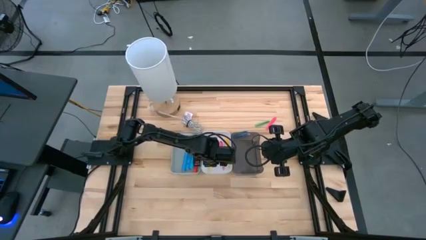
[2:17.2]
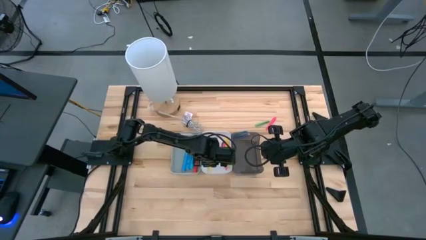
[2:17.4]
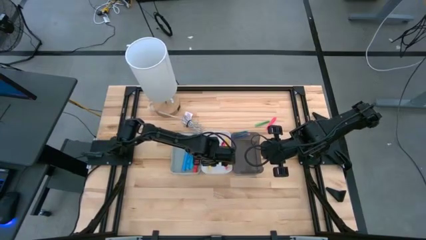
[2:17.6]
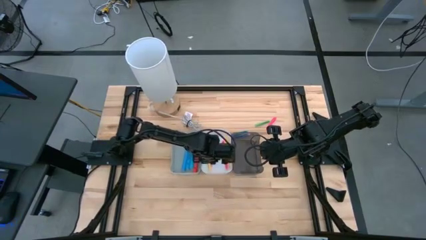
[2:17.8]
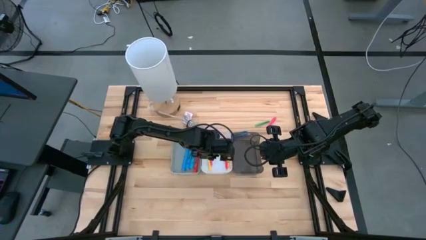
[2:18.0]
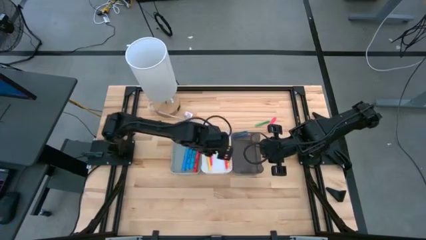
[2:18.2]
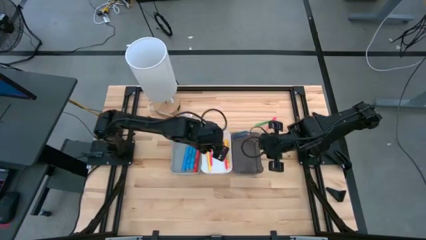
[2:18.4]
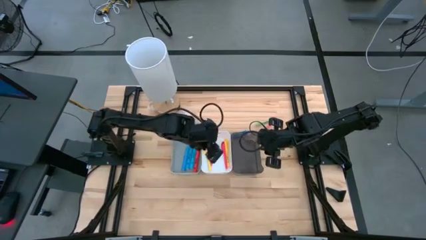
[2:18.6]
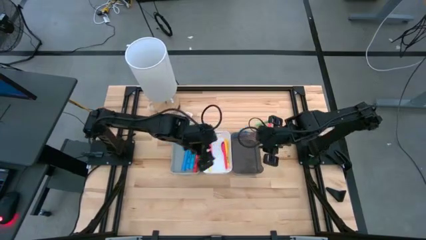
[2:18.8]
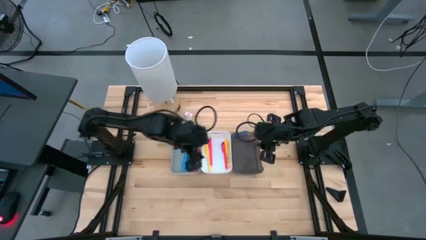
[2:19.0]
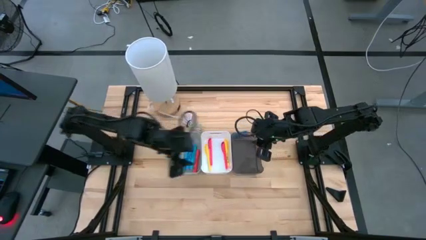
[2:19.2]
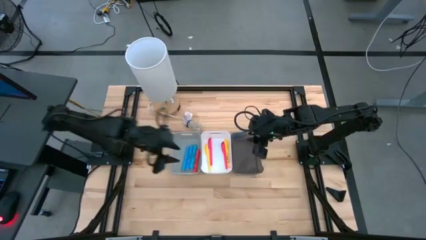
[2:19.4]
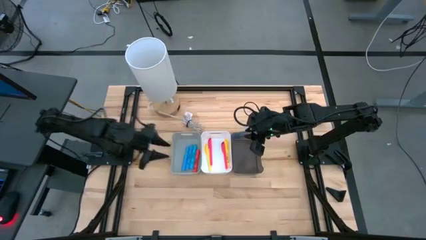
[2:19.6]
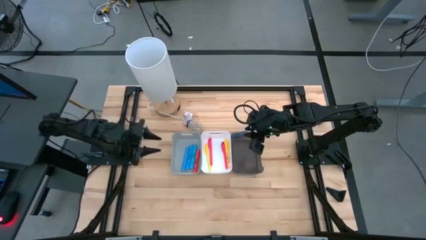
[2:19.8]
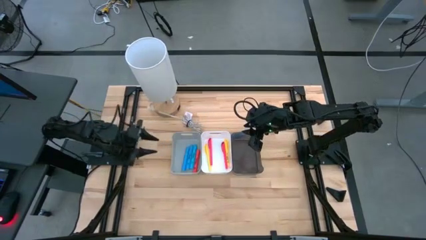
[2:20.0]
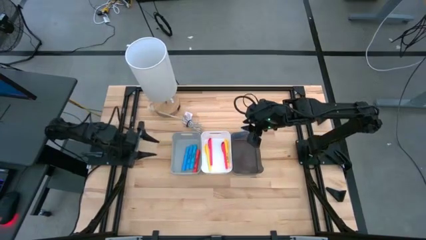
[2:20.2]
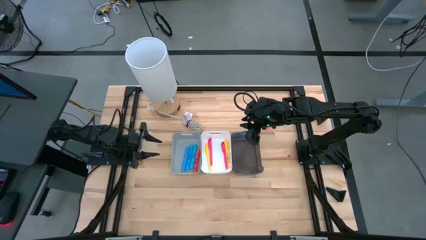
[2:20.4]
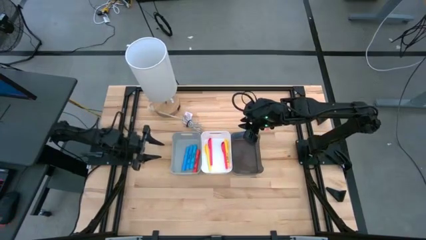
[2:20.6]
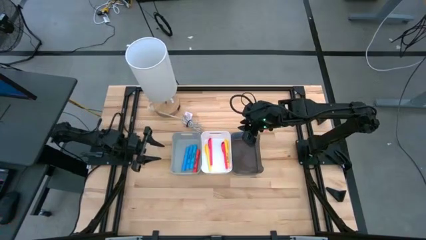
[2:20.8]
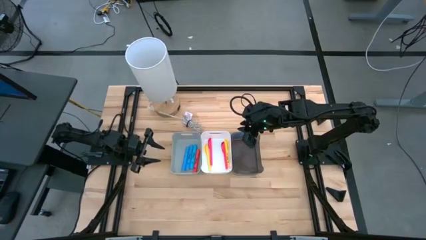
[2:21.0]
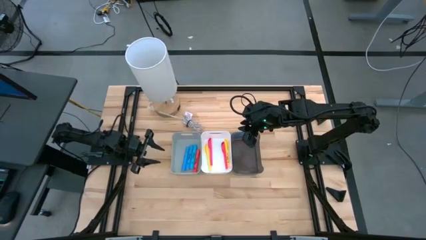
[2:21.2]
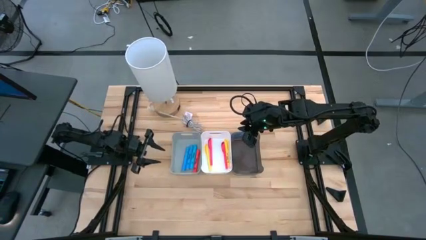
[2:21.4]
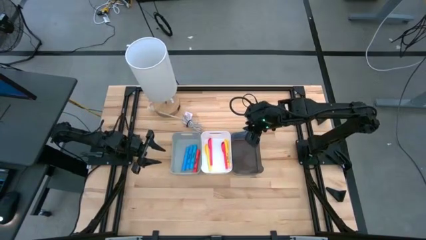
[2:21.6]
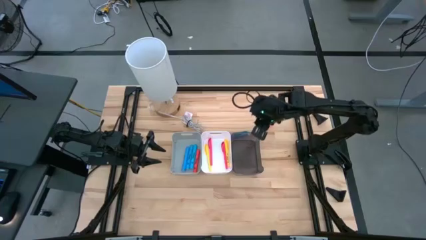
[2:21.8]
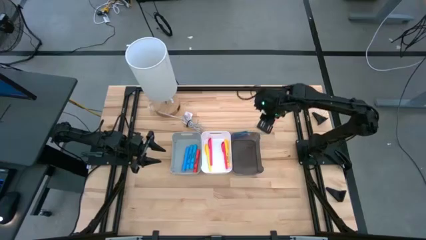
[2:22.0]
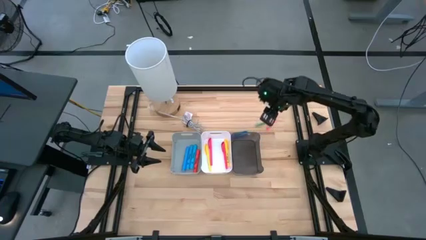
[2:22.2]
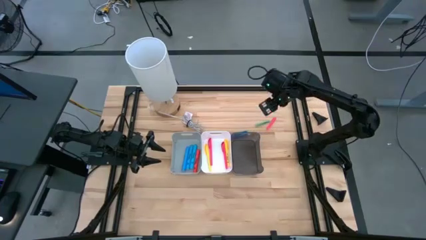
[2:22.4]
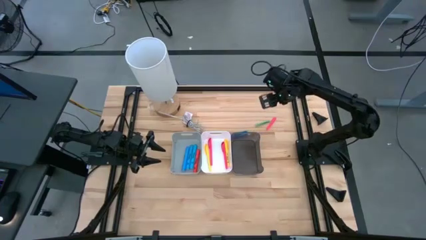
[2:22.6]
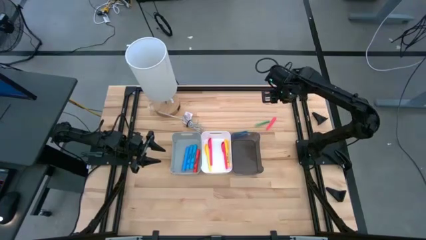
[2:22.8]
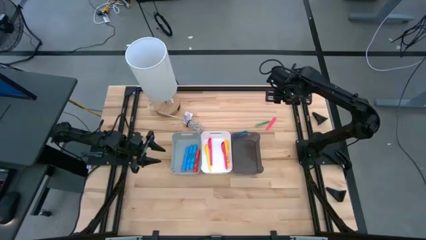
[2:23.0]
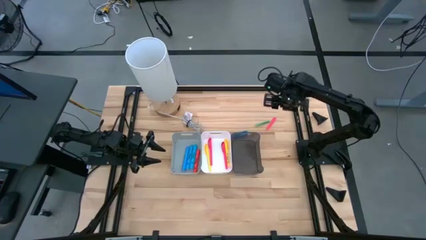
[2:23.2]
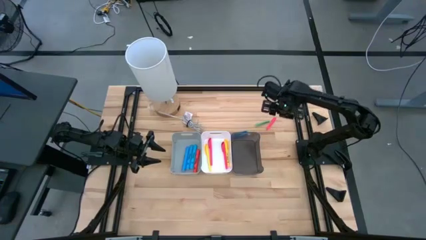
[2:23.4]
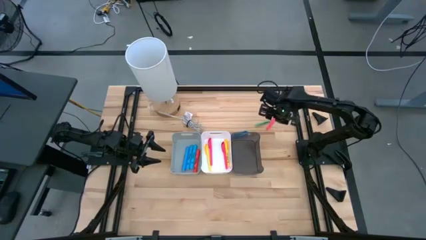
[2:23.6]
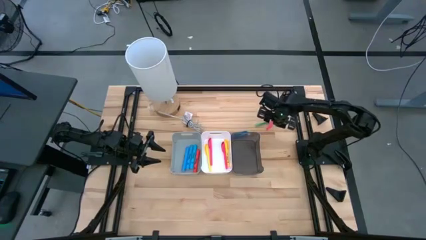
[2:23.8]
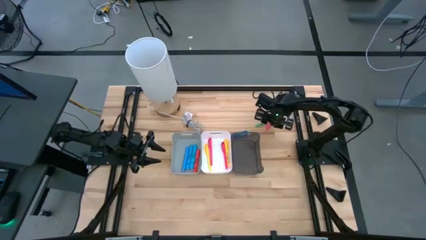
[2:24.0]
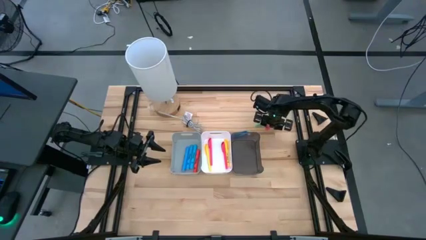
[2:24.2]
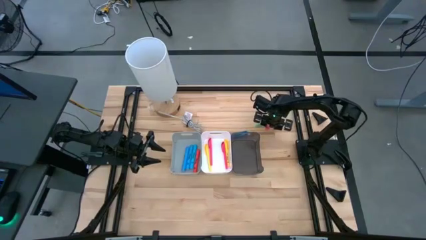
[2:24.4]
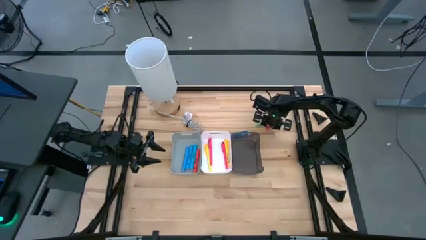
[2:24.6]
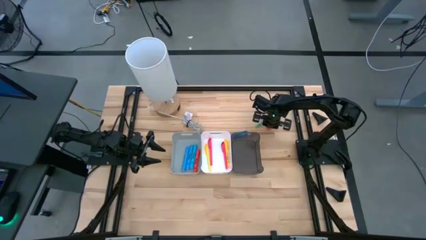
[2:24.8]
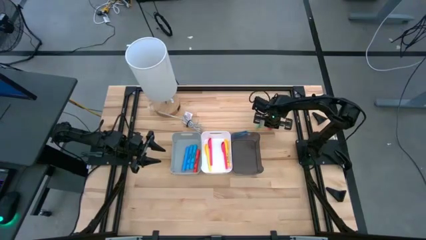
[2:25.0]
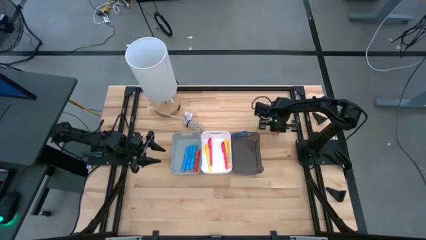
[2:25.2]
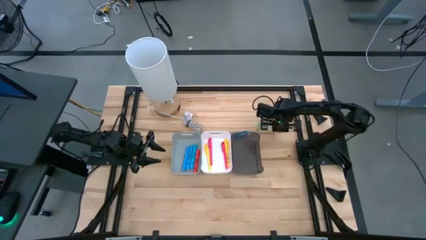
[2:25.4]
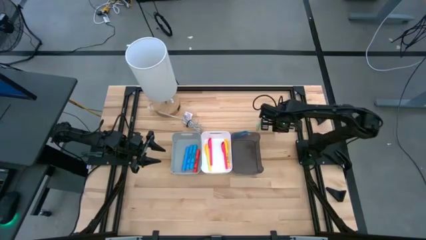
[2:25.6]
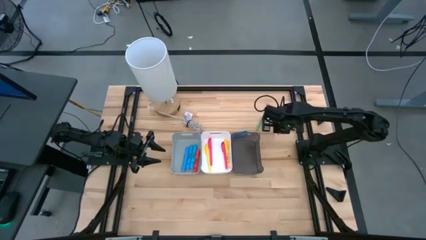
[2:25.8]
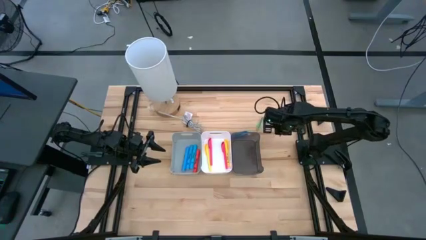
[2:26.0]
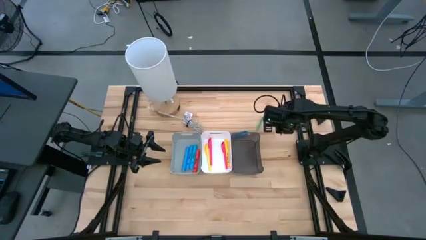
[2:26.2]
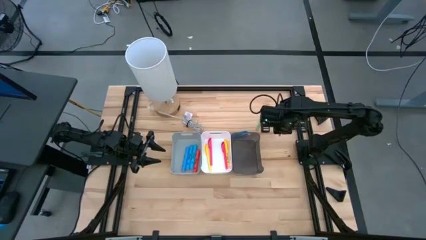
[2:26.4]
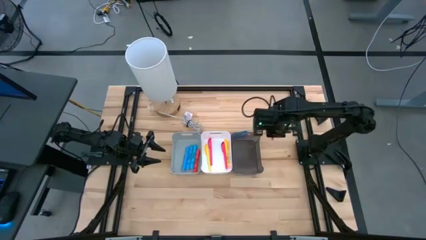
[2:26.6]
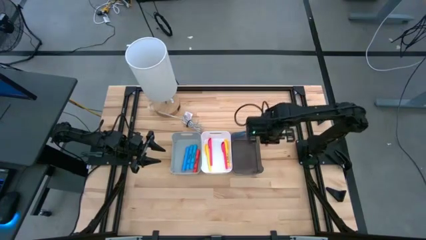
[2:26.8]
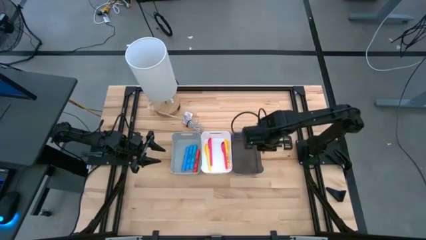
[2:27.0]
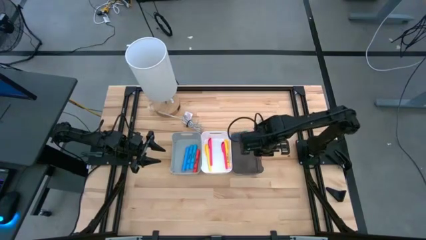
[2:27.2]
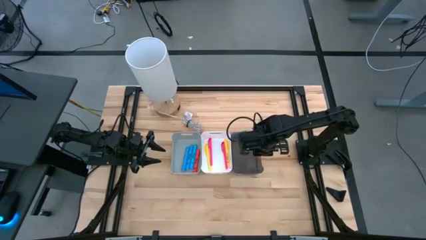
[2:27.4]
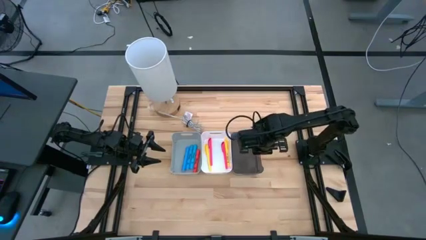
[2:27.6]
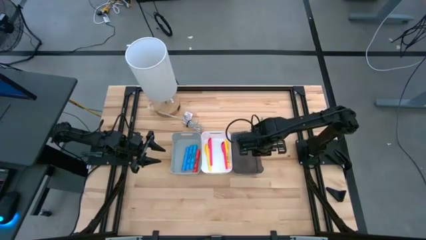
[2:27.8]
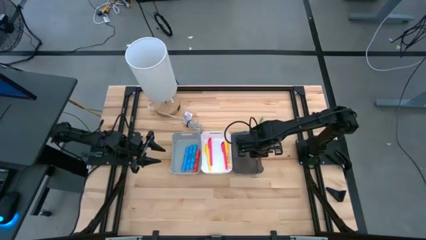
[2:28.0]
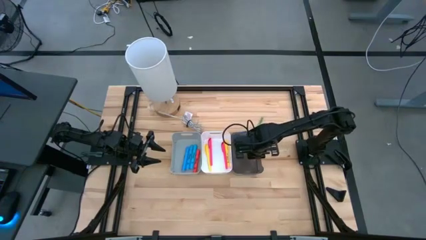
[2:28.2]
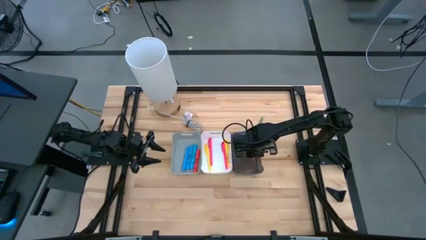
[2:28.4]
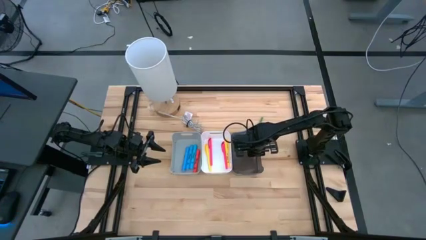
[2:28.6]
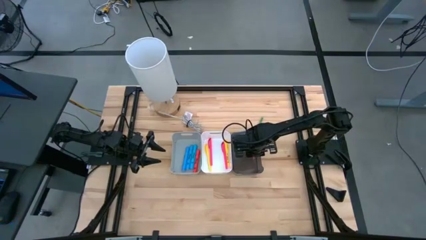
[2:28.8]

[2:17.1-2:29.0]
Task: Pick & Place Markers
Put the small pink pen into the black bin

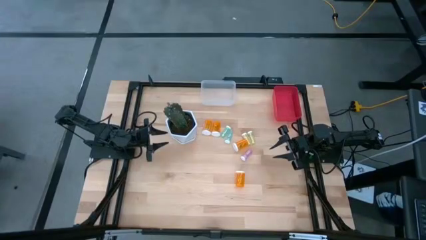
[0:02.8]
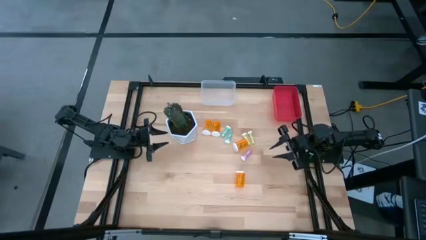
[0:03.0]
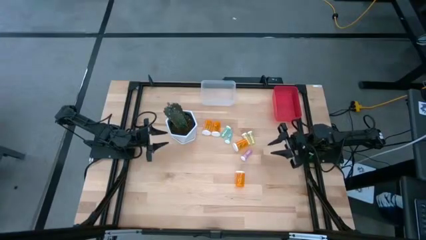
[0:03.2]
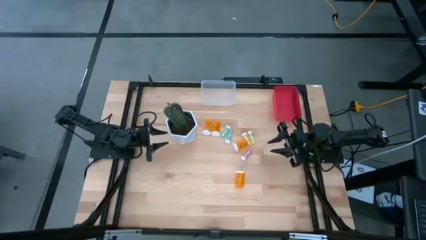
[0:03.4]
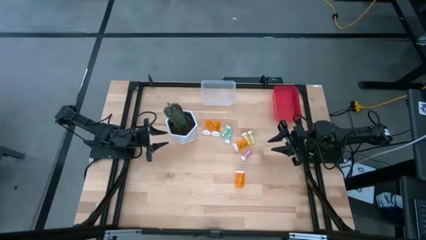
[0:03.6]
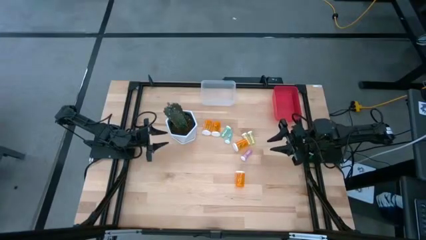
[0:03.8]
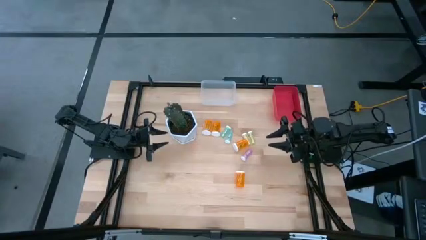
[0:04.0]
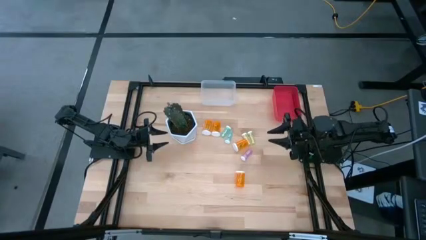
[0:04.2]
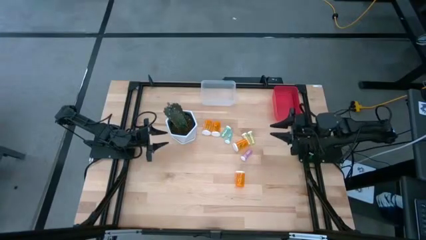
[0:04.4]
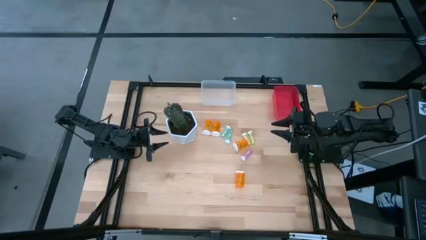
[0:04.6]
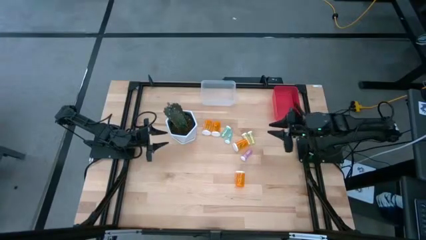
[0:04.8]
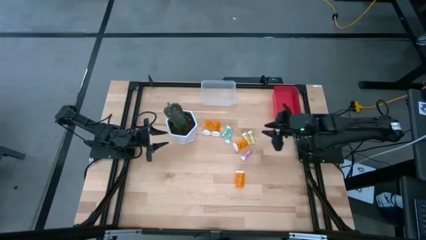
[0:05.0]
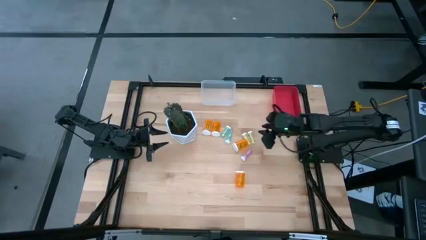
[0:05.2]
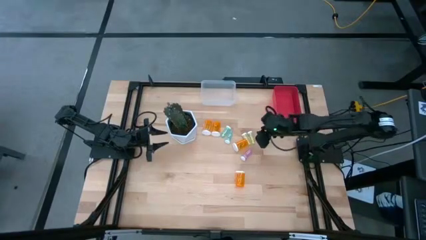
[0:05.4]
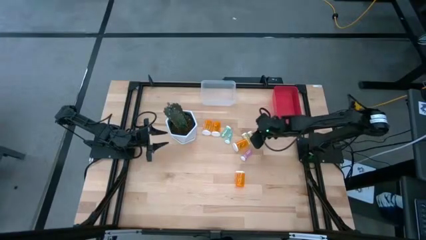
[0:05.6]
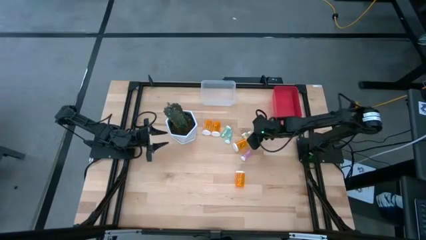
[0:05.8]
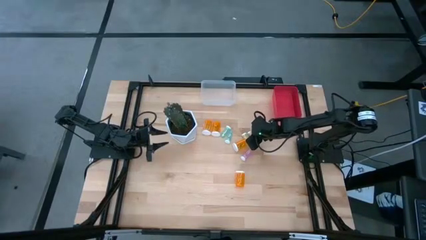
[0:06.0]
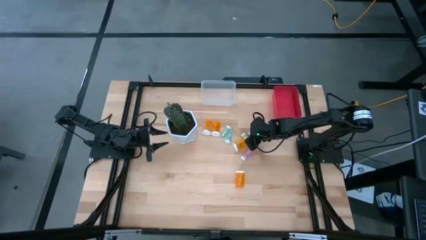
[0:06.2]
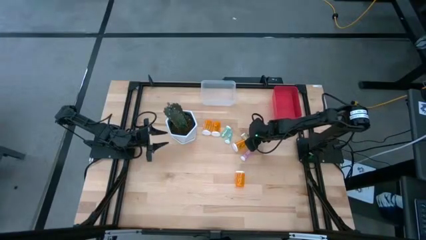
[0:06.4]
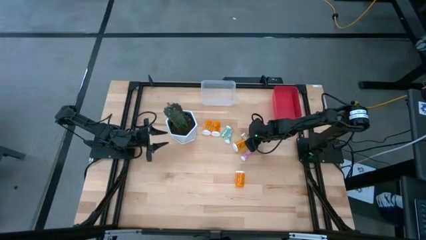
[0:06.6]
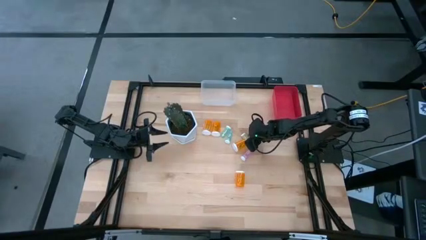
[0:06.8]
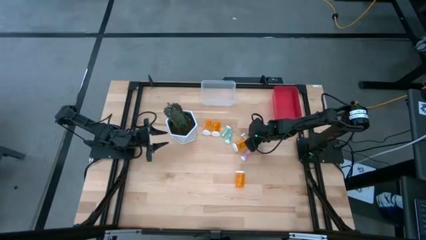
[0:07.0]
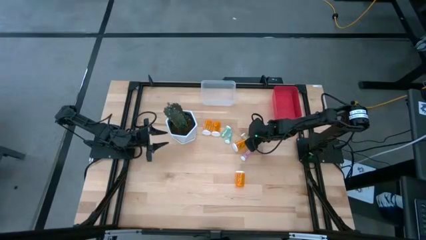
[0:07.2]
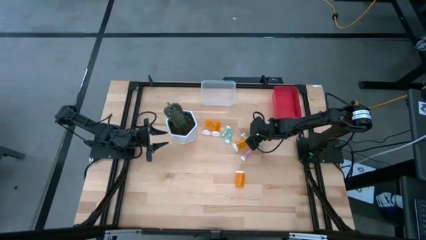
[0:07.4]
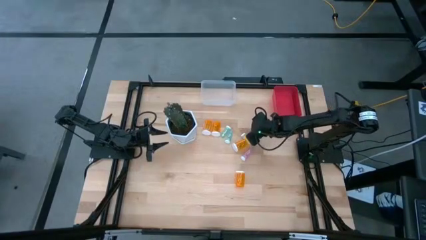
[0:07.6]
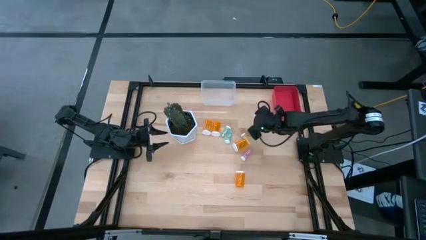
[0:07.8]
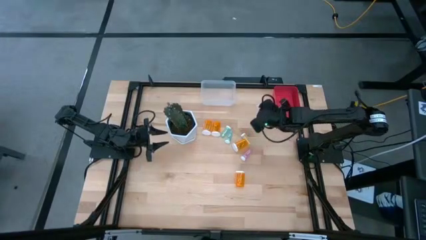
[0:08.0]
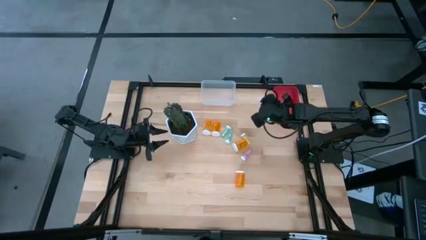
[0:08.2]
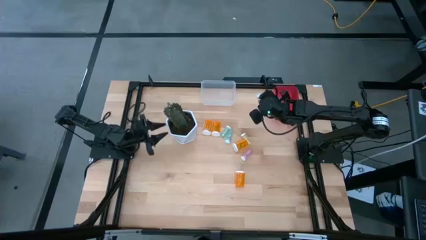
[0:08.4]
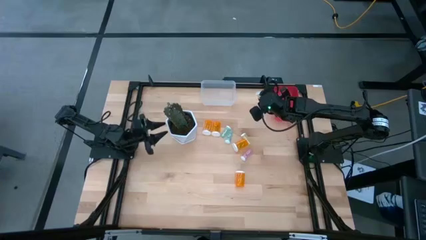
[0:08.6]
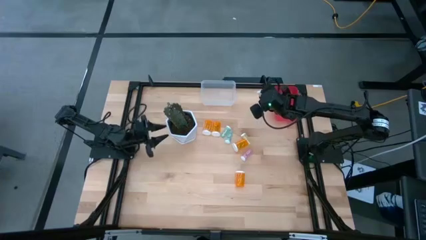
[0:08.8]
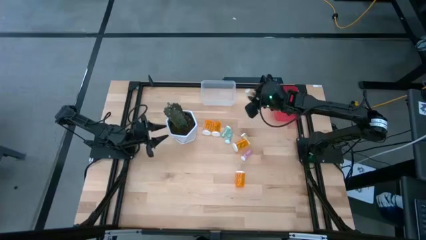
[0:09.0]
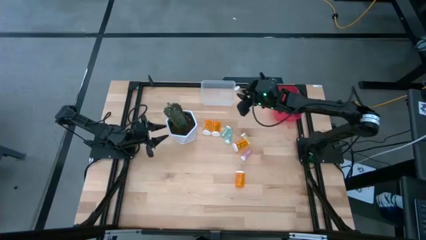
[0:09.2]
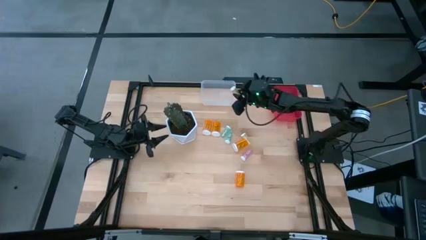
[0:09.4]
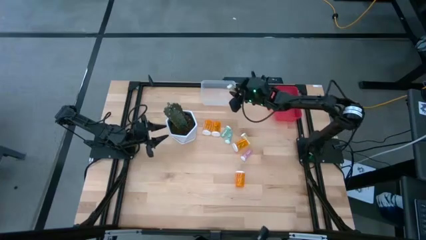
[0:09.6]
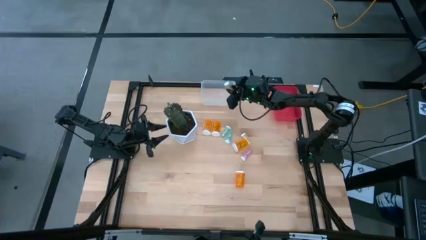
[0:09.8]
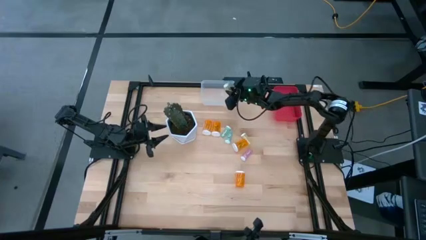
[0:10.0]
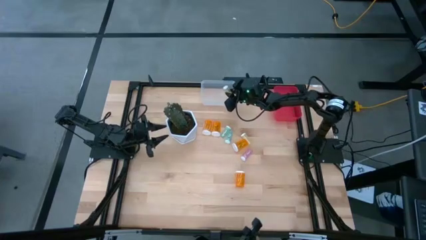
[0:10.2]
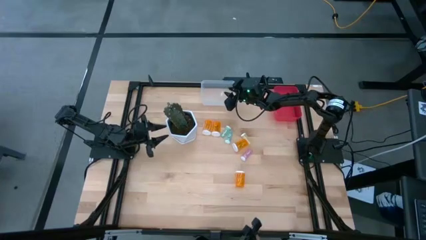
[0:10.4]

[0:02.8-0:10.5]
Task: Pick and place medicine bottles into bin by pill shape (circle, oval)
Put the small yellow pill bottle into the white bin
